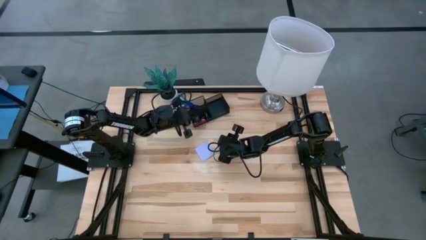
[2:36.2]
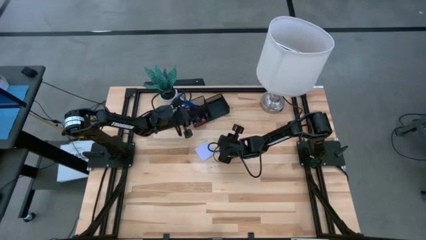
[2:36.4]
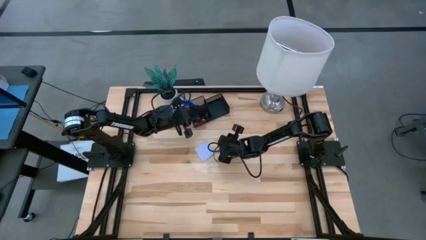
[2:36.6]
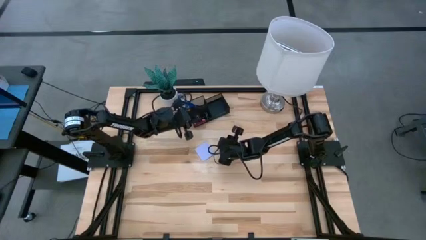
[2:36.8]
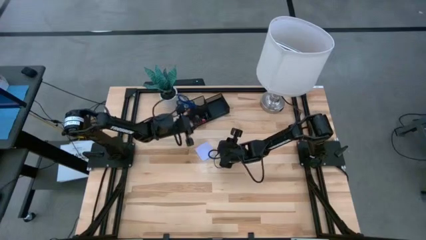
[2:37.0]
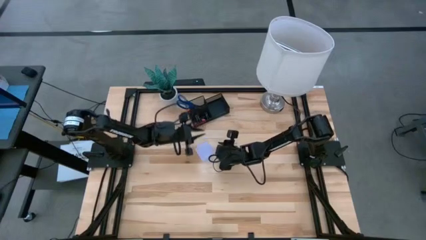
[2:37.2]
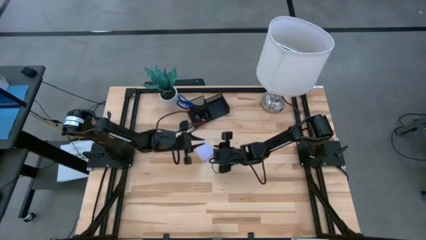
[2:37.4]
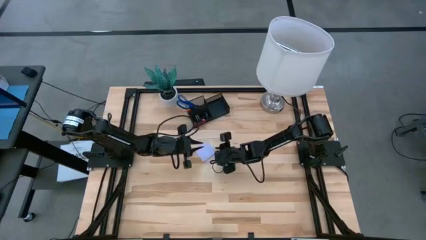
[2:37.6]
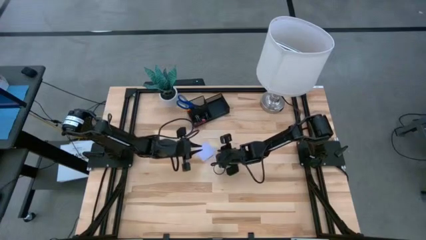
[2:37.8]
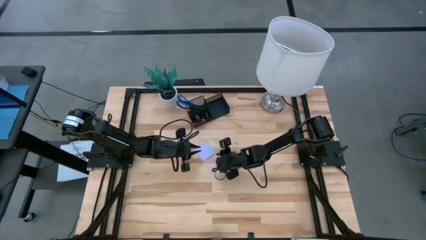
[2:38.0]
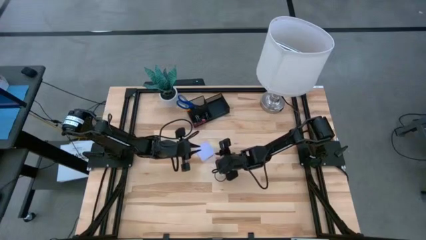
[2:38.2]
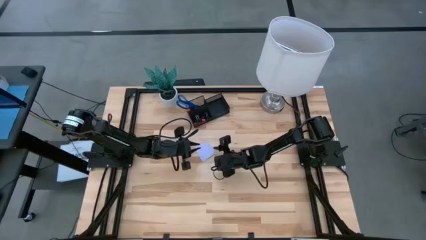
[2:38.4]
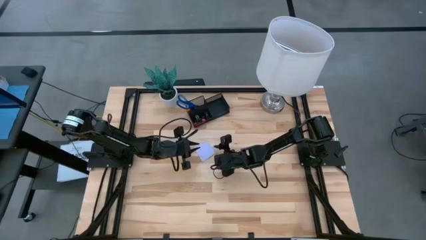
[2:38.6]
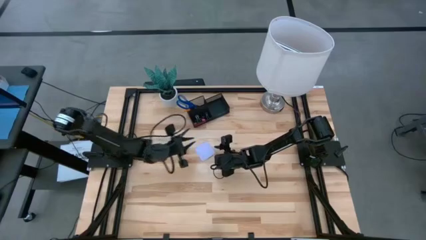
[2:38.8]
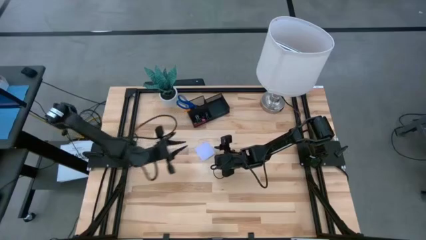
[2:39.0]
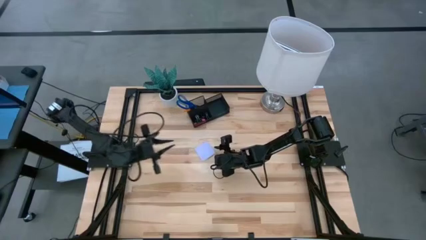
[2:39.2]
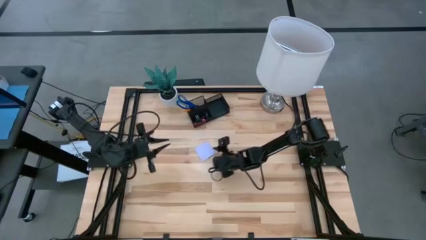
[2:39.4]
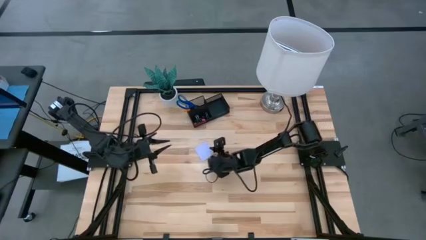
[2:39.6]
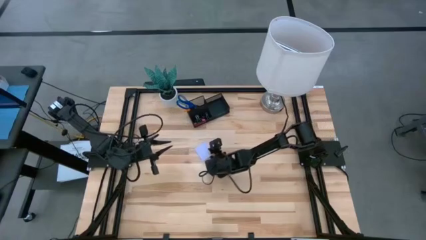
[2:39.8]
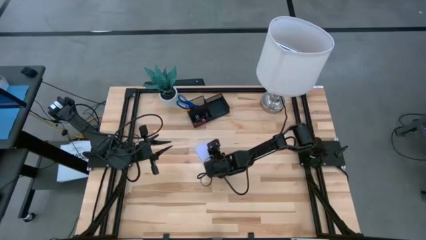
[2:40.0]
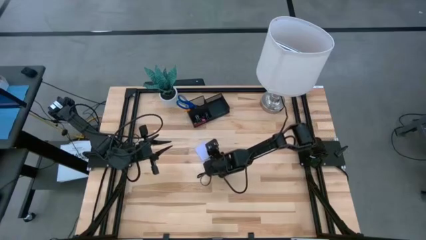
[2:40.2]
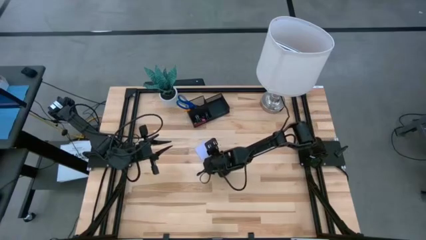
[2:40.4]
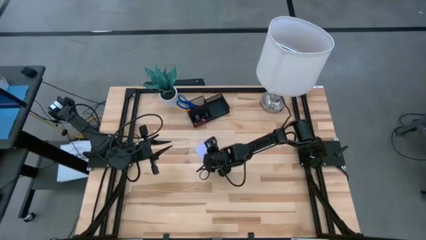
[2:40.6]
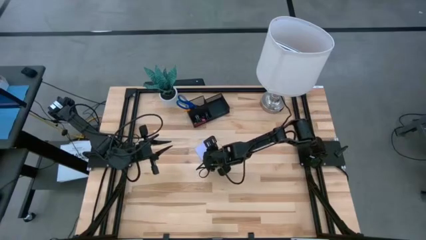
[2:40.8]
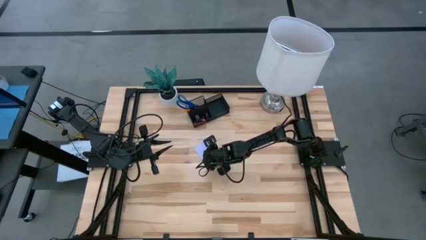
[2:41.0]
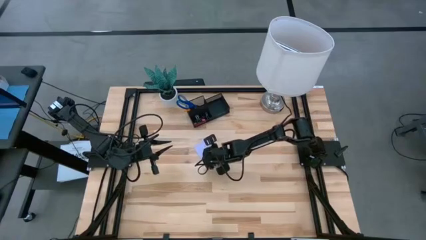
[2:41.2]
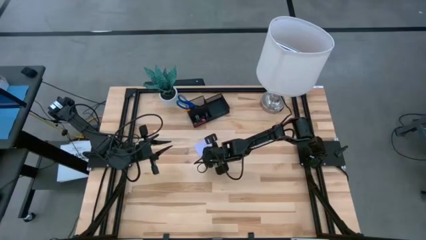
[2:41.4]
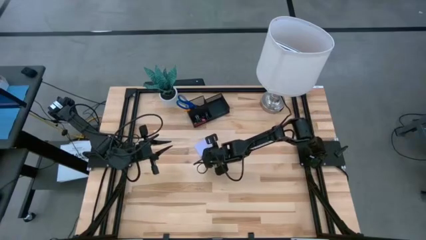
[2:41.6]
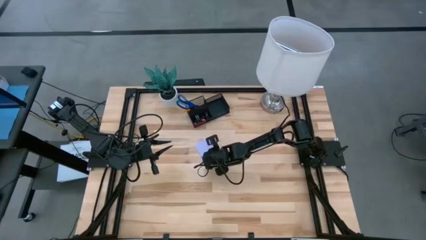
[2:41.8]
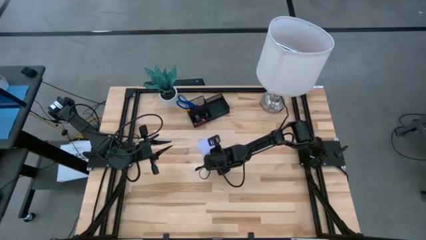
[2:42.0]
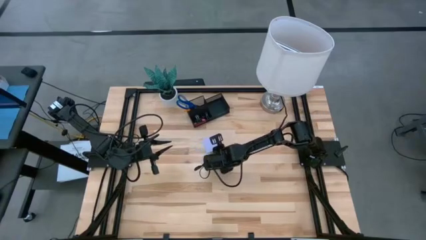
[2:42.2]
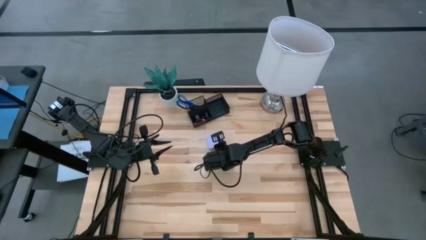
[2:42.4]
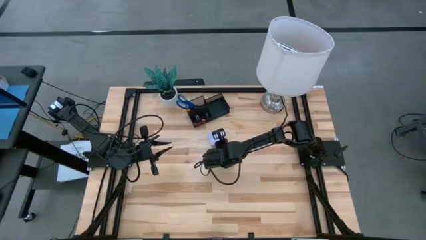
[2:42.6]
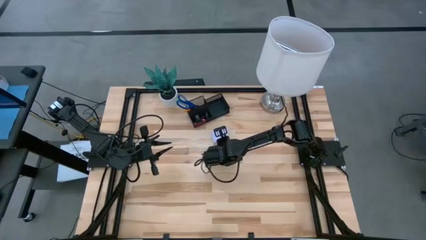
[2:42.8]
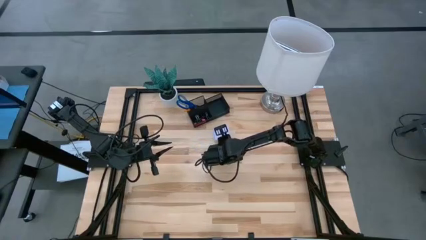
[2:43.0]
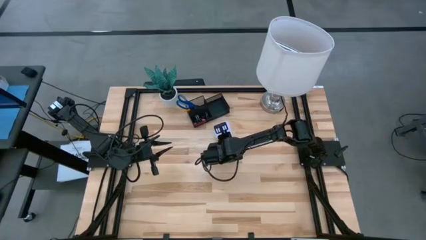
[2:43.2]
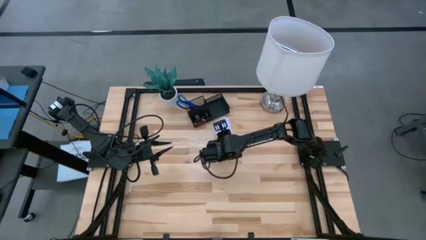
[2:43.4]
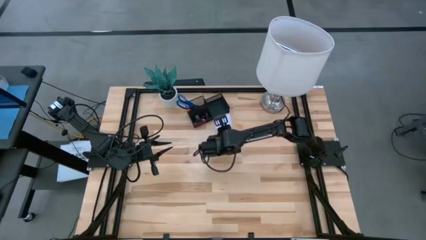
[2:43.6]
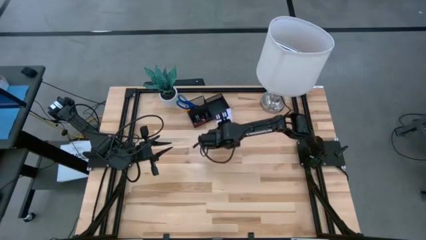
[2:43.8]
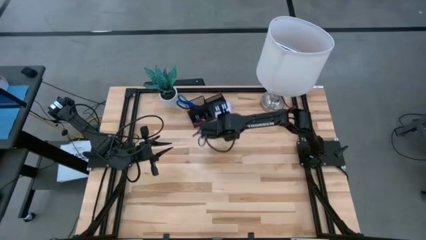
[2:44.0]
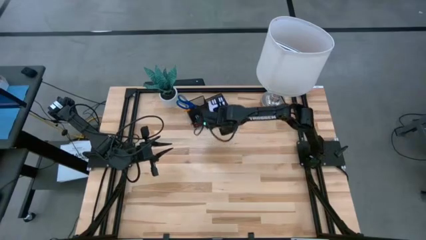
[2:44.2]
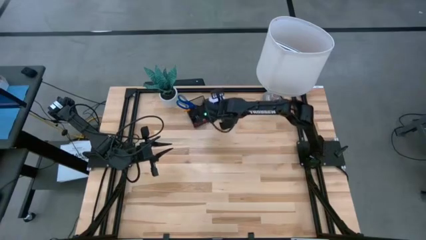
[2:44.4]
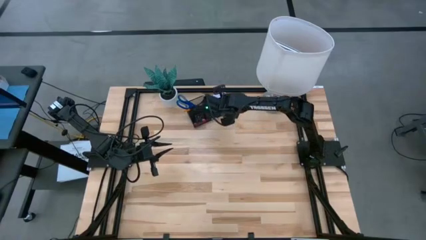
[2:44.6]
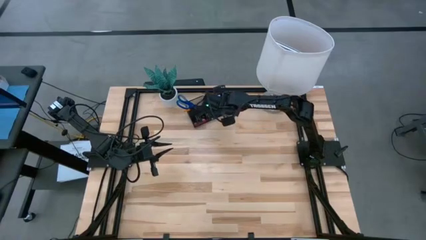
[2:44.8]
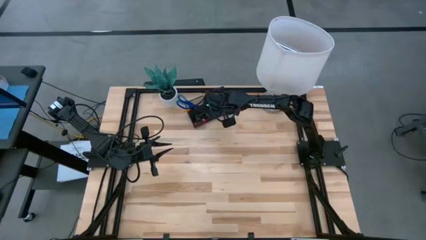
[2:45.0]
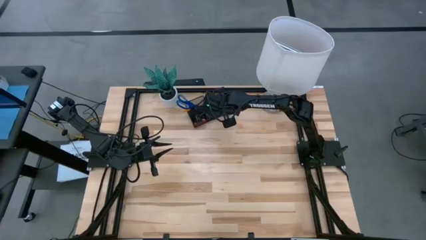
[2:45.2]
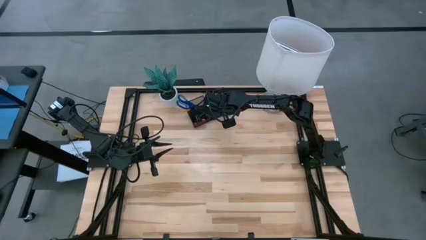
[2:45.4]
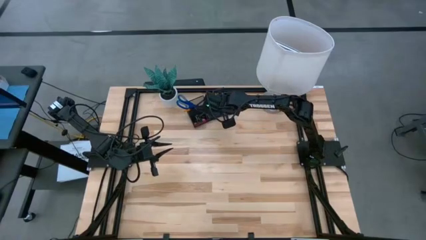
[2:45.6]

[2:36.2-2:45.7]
Task: Pick and place office supplies into organizer
Put the sticky notes into the desk organizer

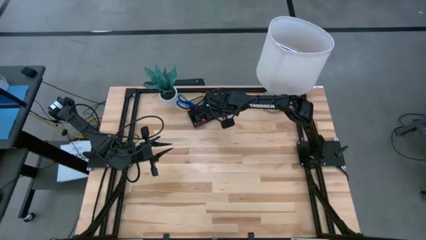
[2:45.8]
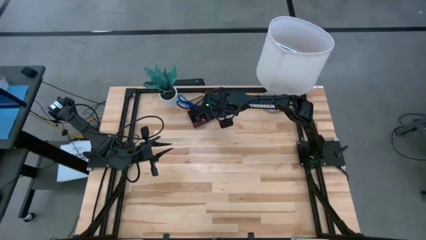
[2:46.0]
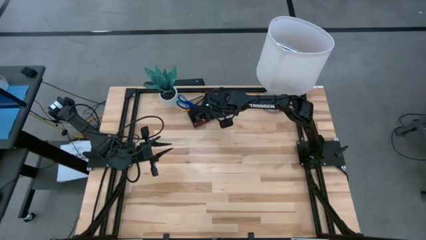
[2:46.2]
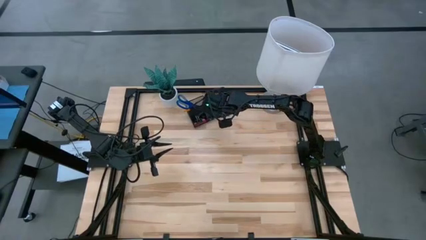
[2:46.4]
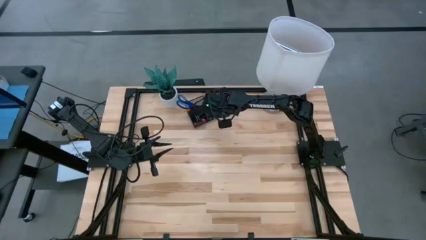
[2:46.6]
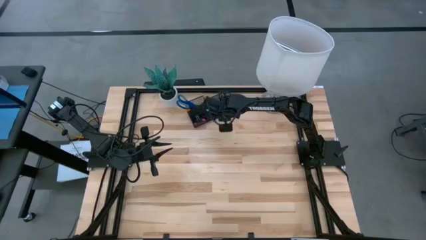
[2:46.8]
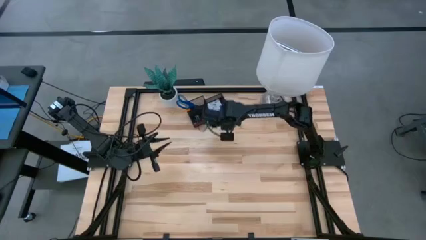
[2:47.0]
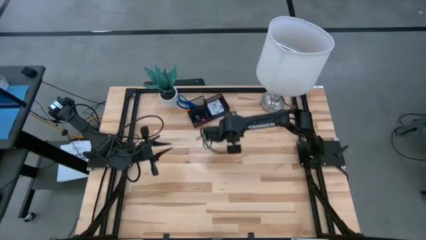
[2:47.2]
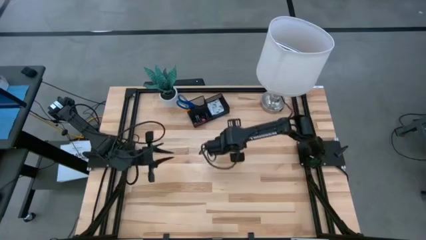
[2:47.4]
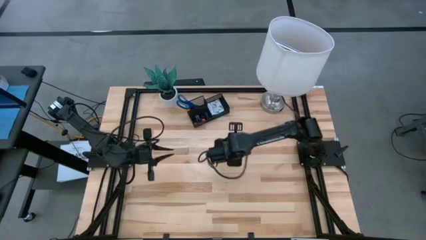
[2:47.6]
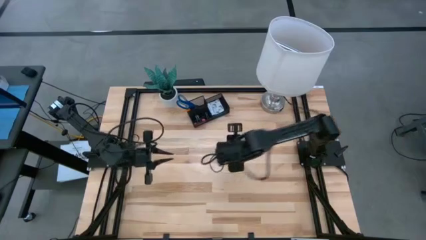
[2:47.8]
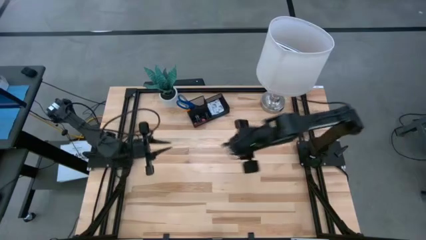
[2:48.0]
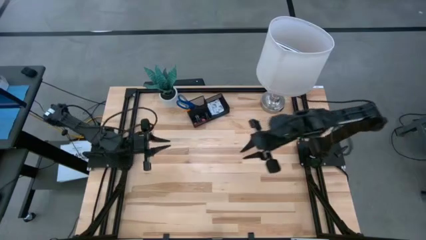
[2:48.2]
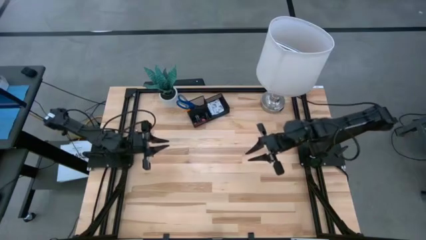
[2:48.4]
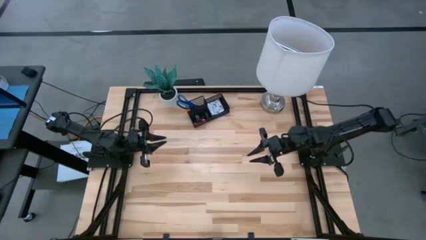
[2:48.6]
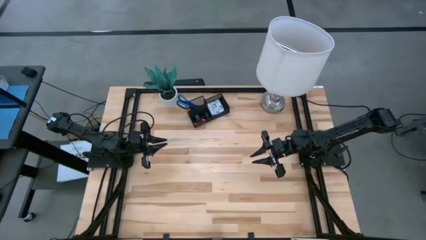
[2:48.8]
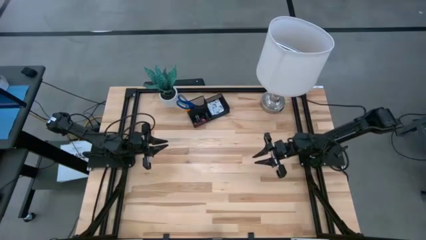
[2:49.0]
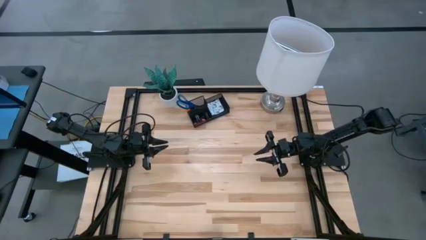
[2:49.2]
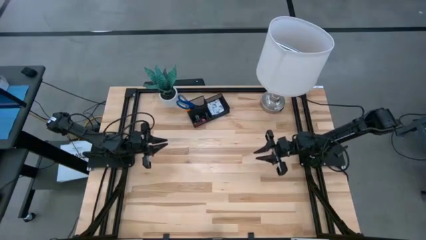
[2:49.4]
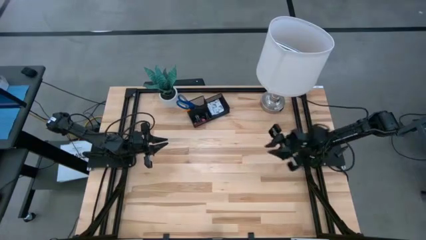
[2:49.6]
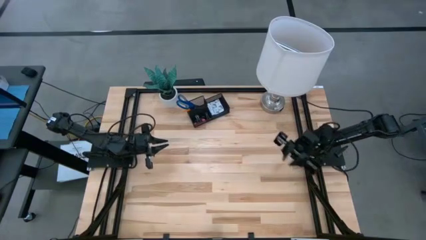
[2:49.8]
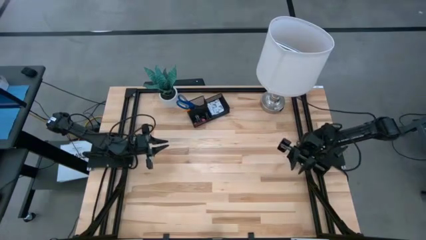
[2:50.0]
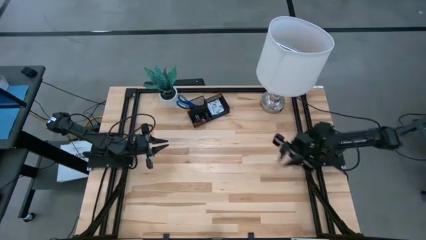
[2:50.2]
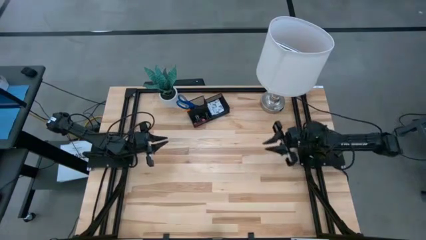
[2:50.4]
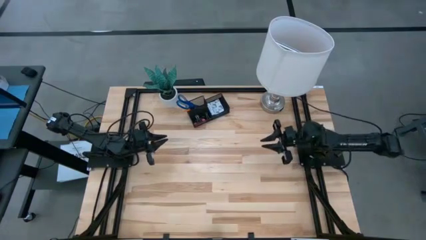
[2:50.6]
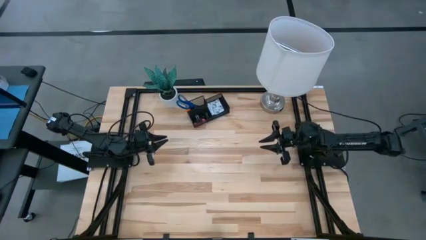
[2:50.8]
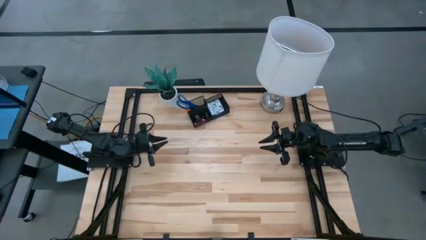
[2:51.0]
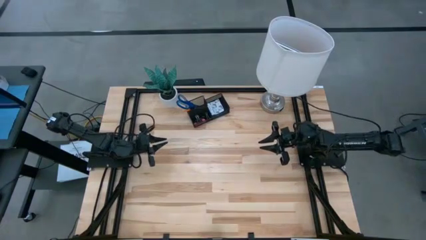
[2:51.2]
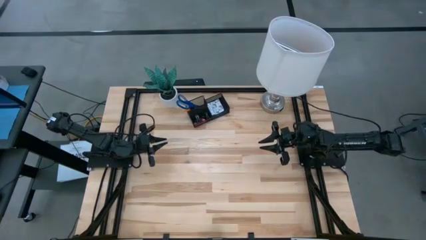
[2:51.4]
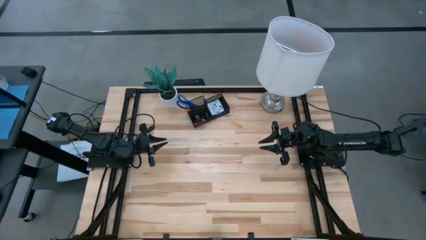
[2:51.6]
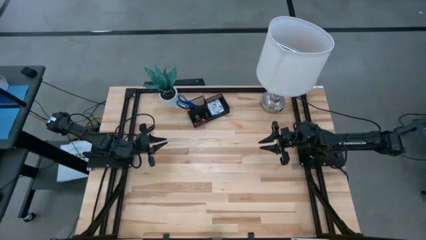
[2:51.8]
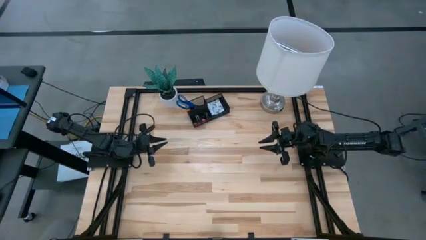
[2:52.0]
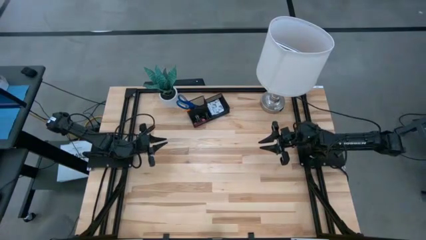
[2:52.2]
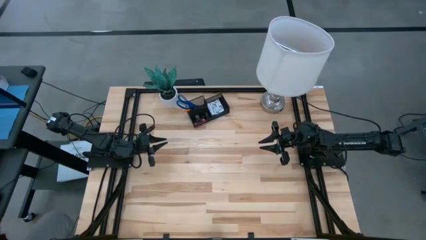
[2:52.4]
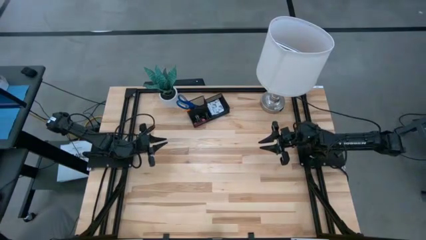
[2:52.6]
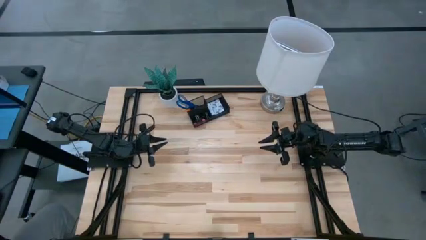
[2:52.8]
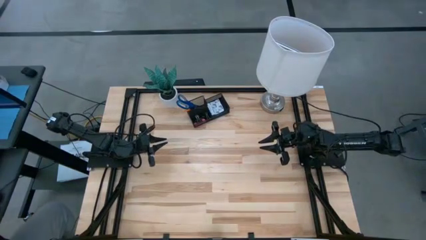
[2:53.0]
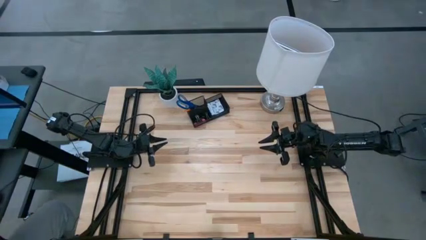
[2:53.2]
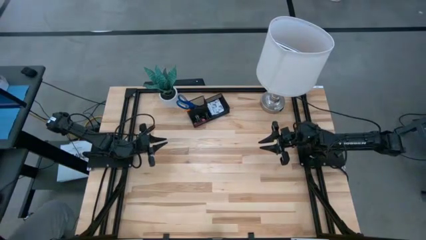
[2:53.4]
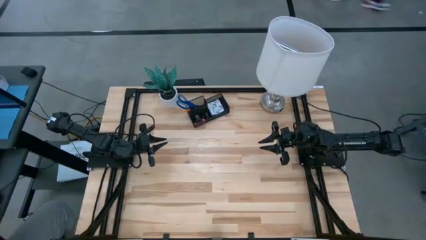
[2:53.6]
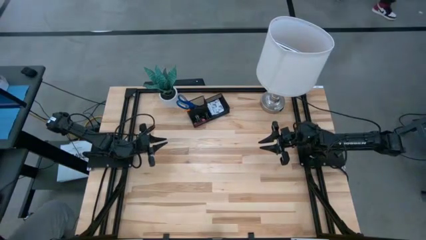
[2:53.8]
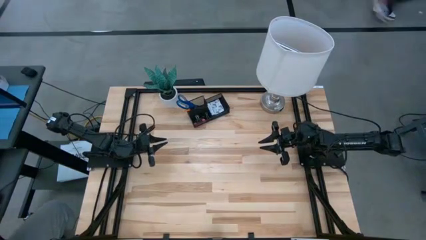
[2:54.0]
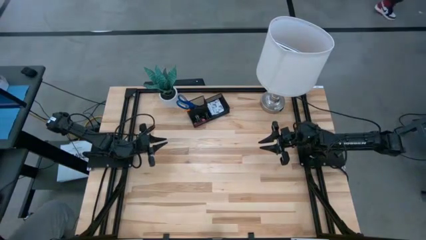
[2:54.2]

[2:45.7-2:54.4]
Return to Home Position
